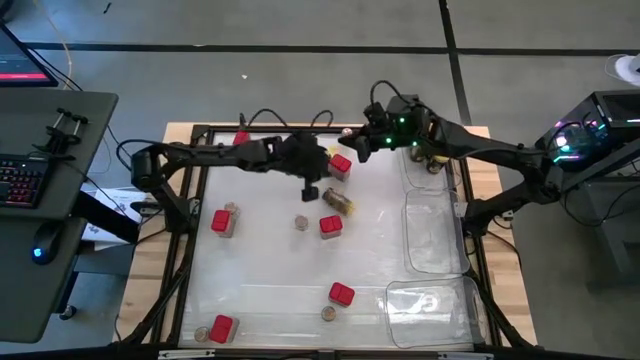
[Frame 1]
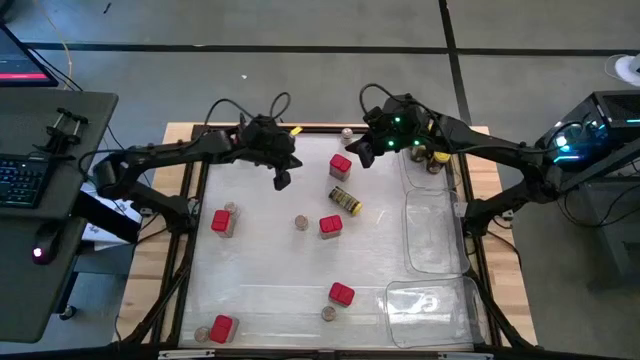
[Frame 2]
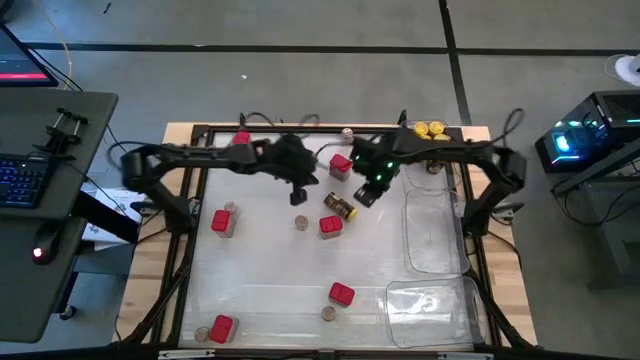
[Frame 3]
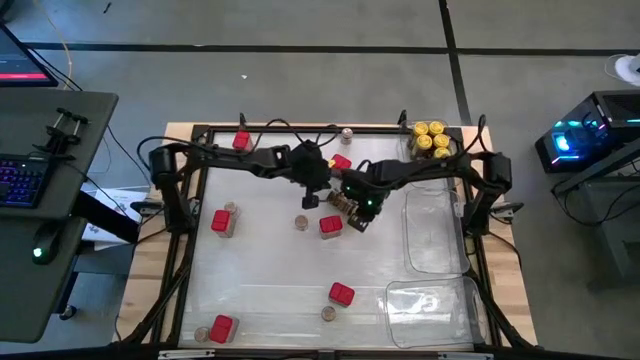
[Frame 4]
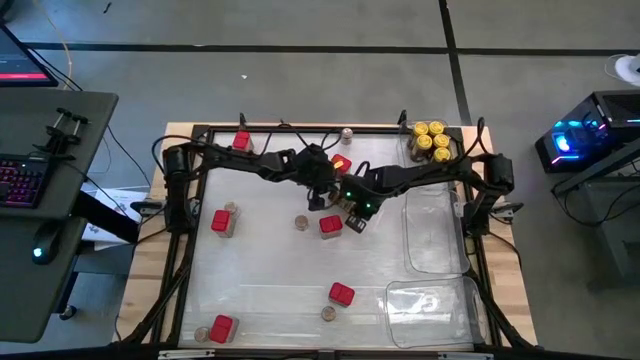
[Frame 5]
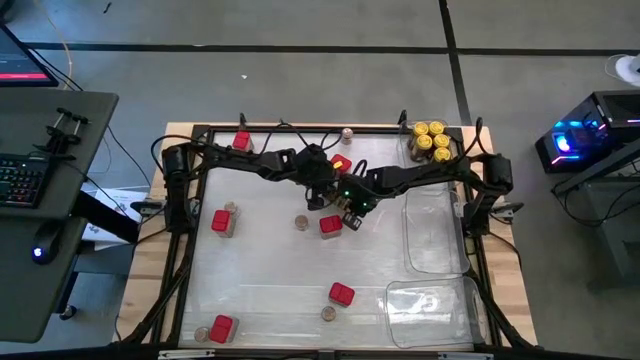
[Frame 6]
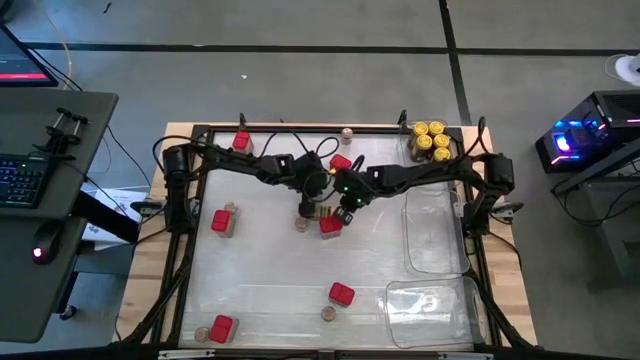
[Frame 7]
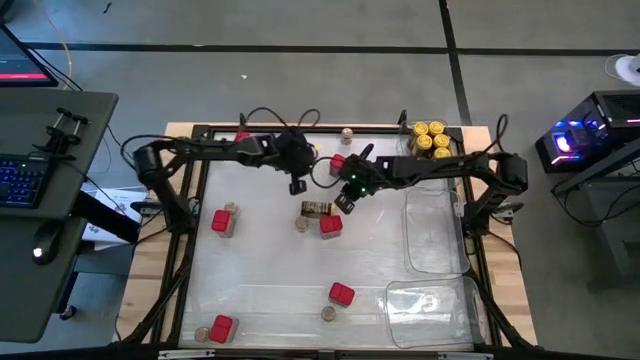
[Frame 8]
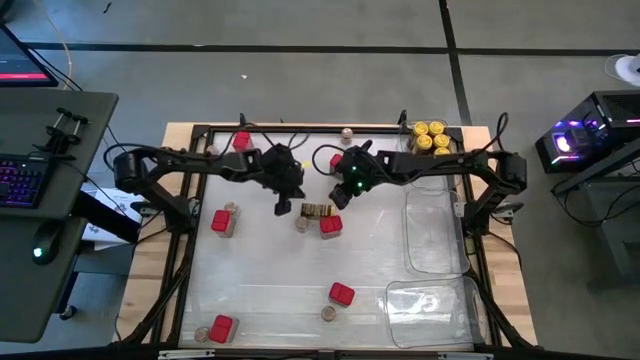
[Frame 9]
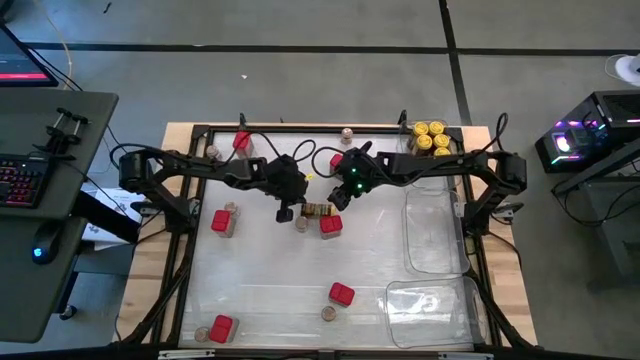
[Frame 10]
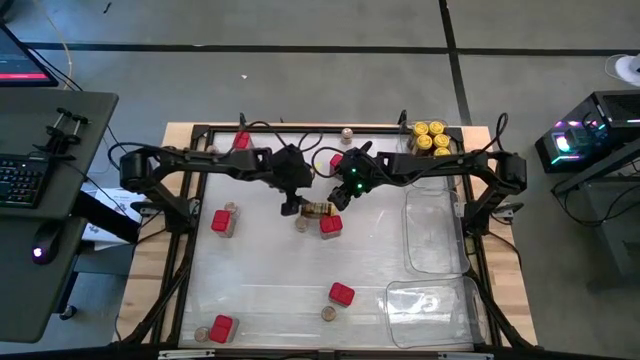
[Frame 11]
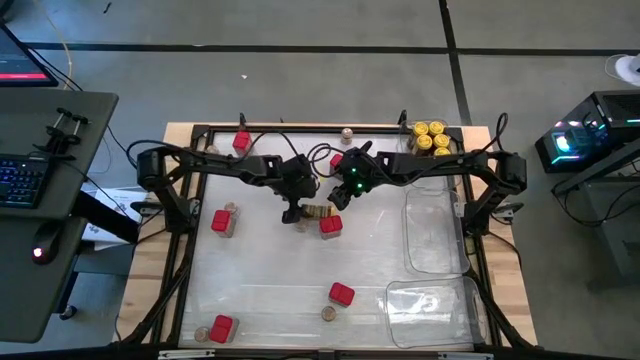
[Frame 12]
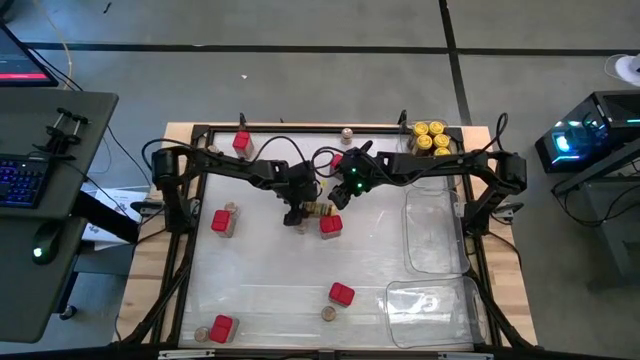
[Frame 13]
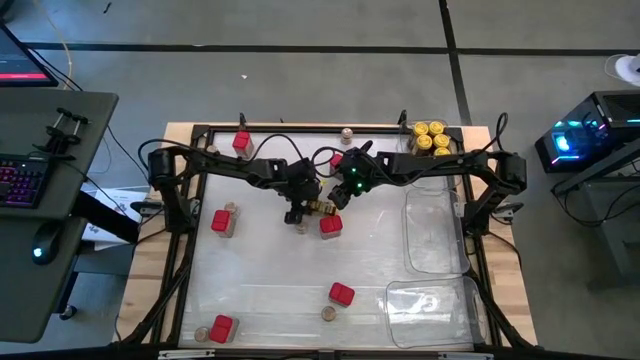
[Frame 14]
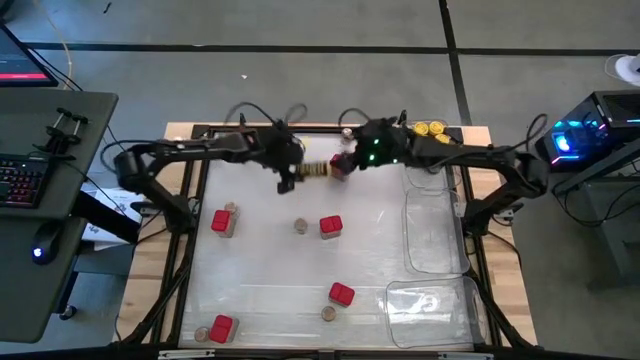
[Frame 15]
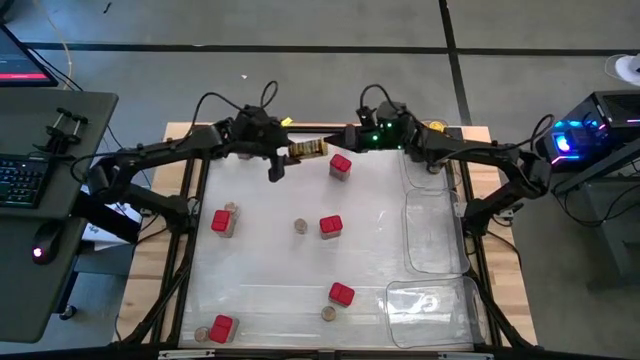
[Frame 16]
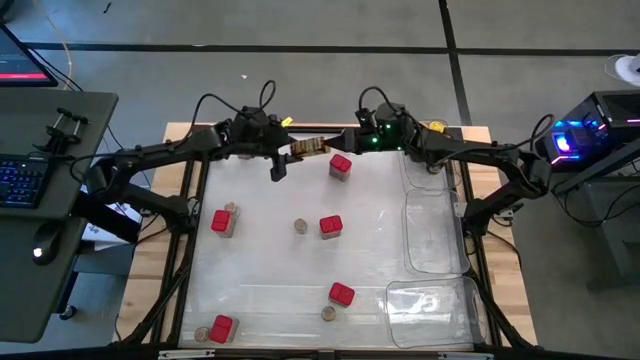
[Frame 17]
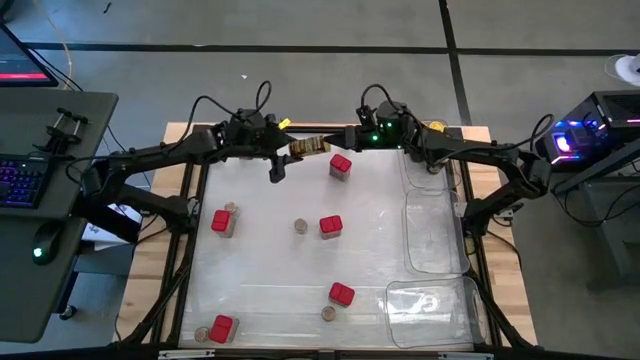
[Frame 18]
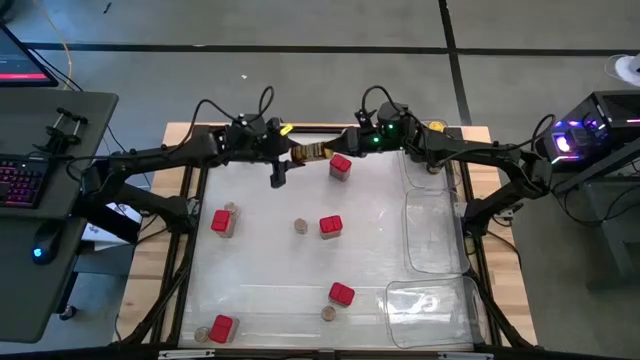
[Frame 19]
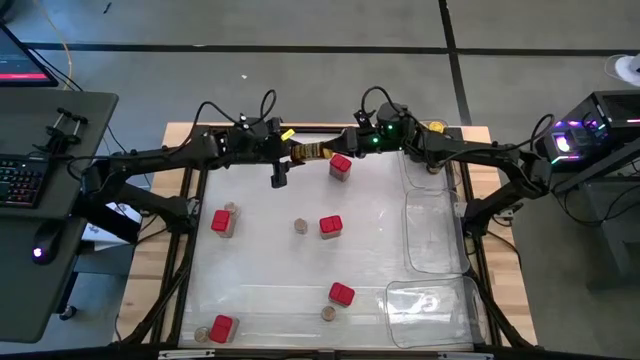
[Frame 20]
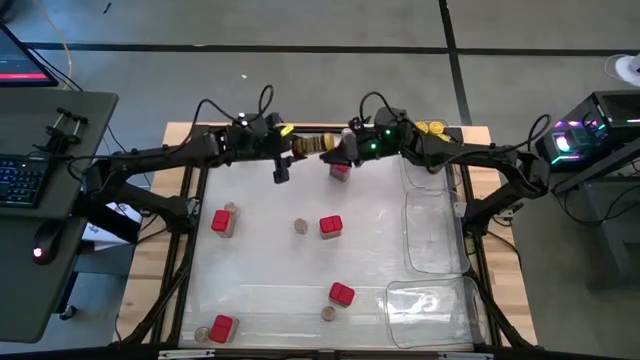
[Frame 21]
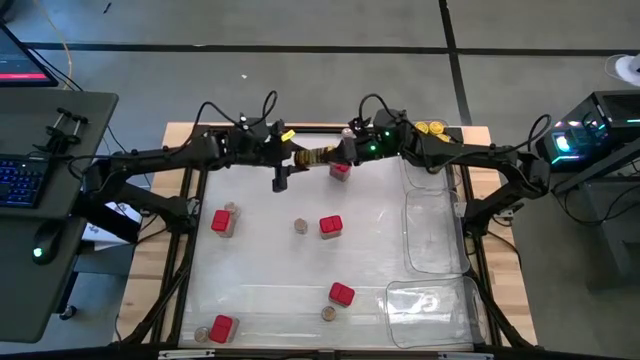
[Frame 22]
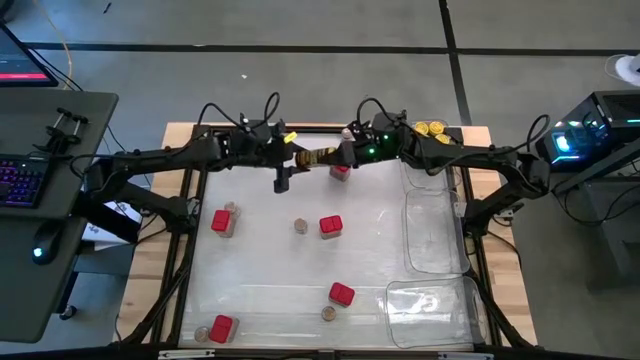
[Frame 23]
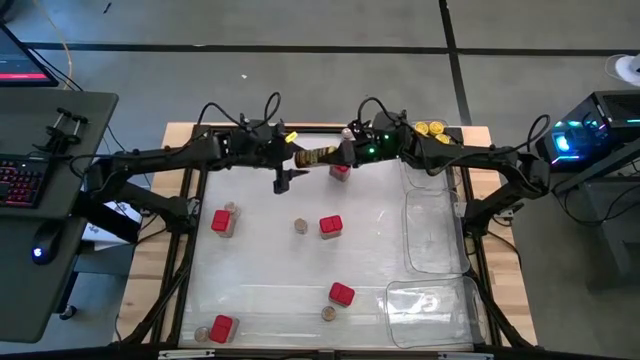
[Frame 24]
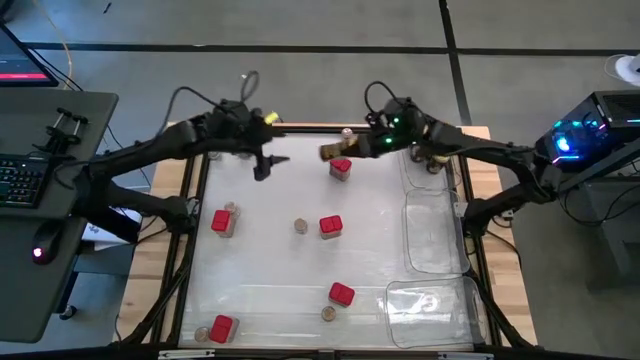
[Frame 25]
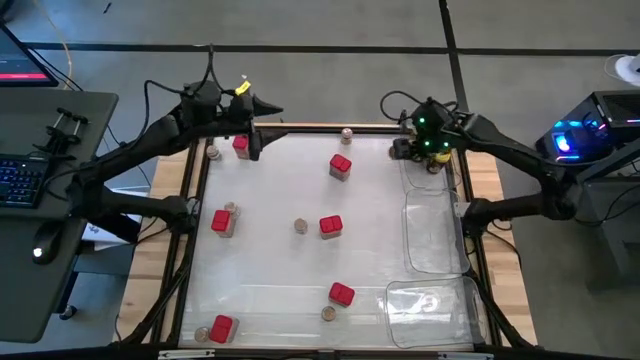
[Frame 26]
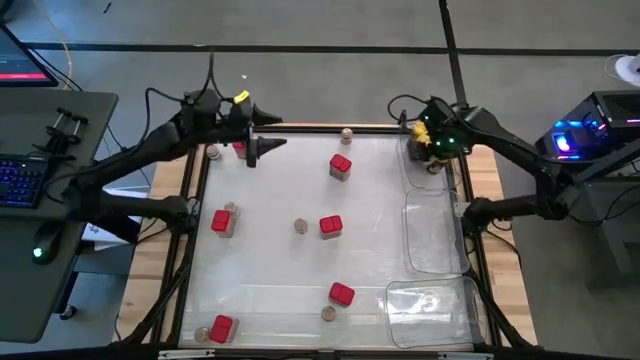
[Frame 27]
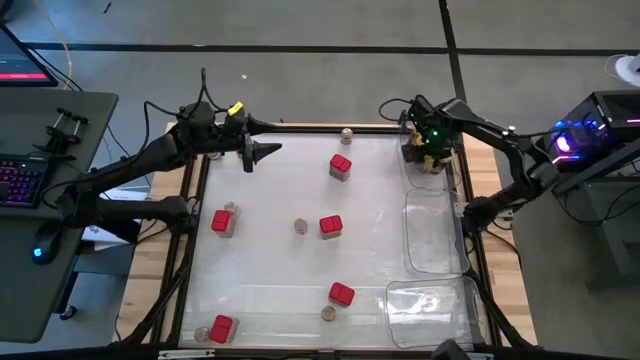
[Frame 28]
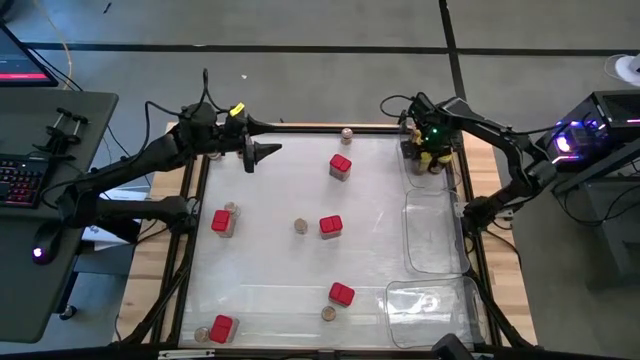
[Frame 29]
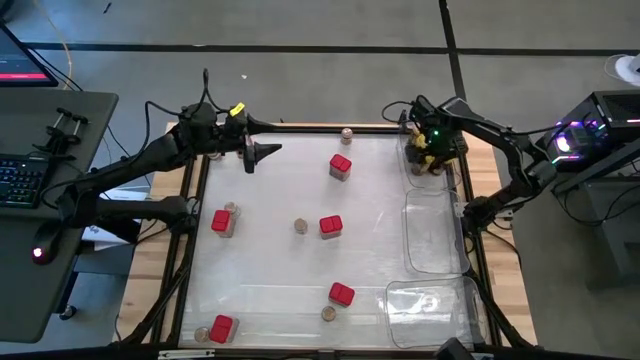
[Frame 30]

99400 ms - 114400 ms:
Task: Sort spices by type
Put the yellow seasoning bottle into the top transparent bin

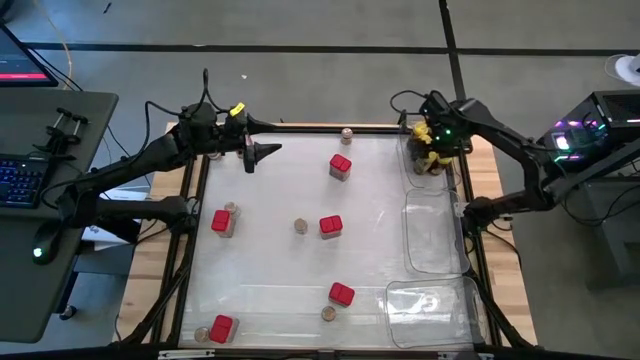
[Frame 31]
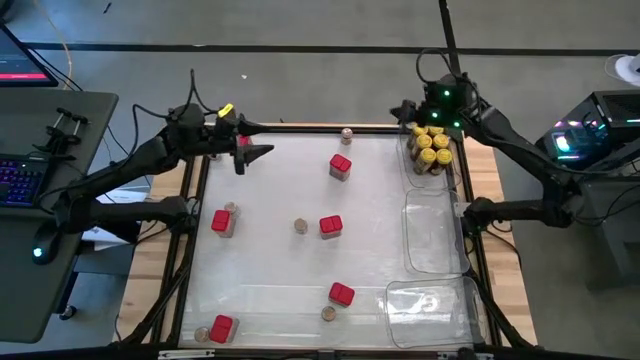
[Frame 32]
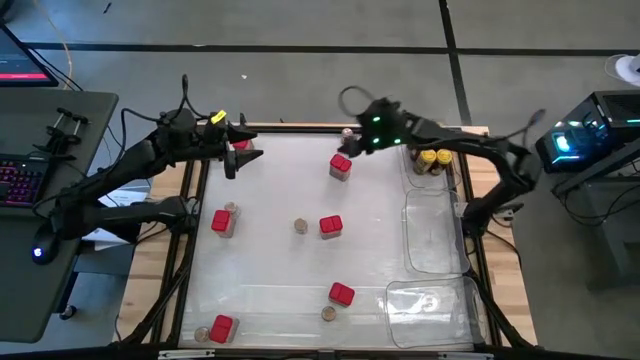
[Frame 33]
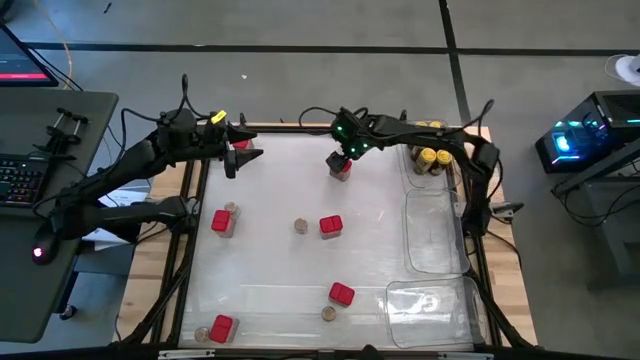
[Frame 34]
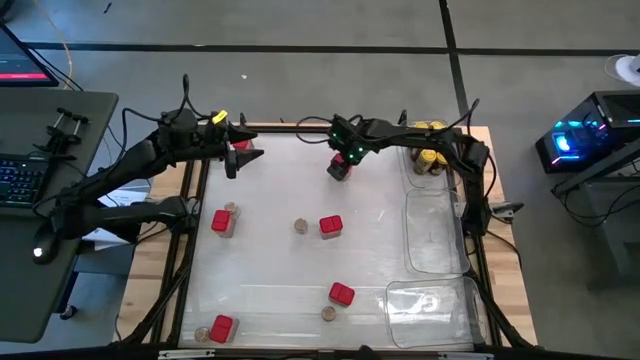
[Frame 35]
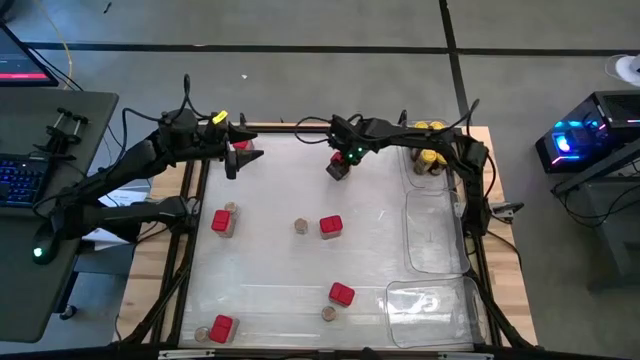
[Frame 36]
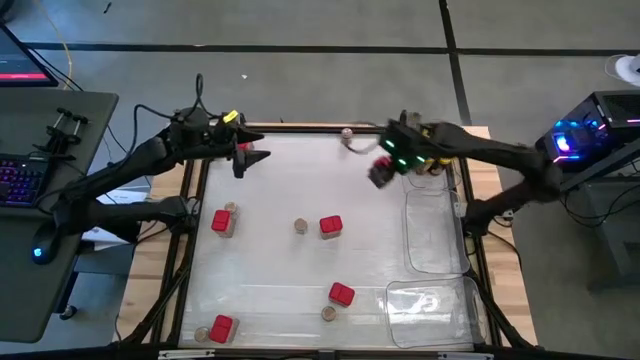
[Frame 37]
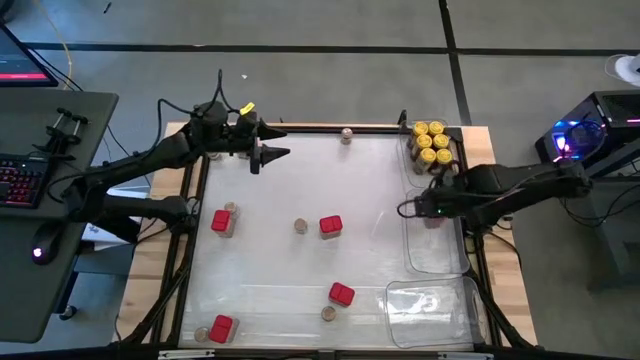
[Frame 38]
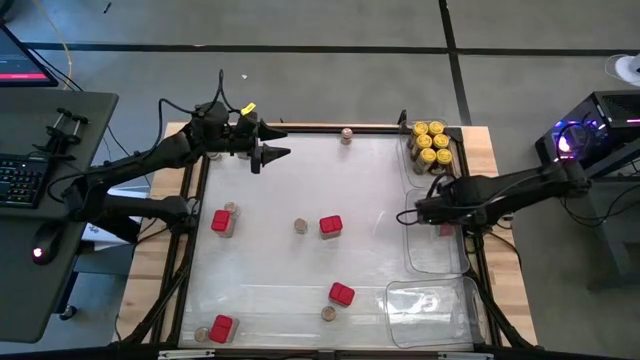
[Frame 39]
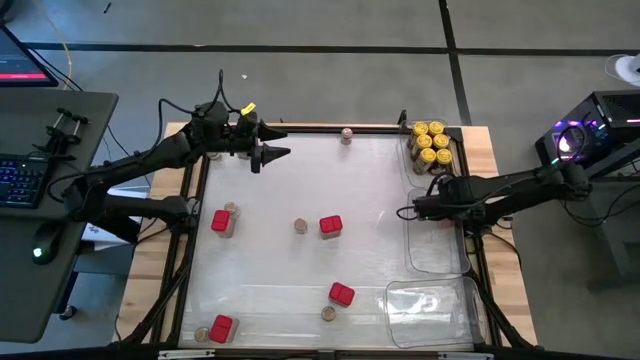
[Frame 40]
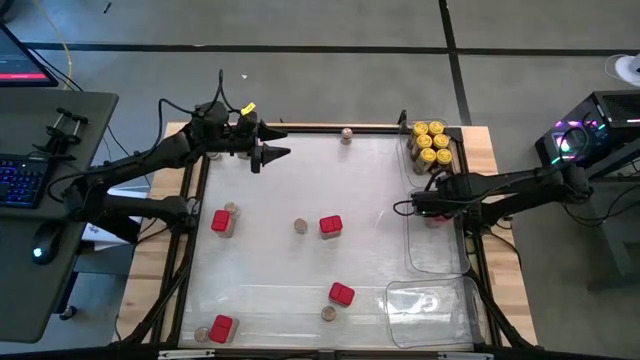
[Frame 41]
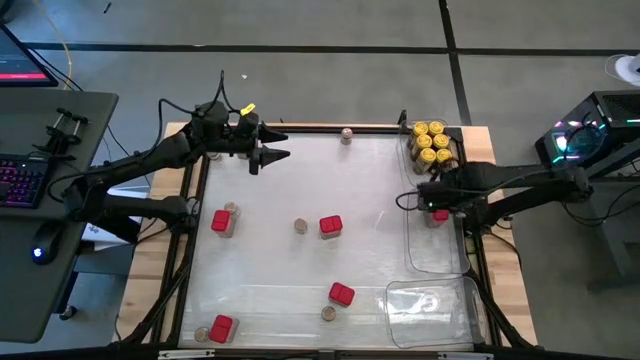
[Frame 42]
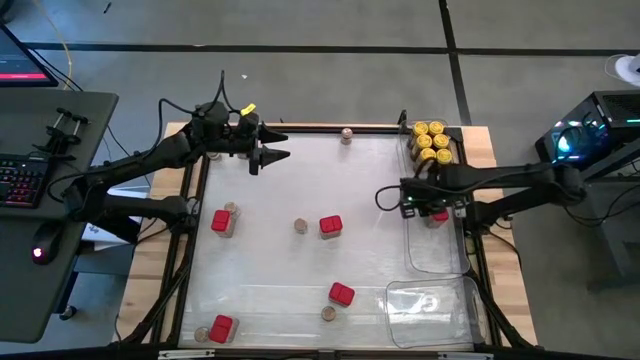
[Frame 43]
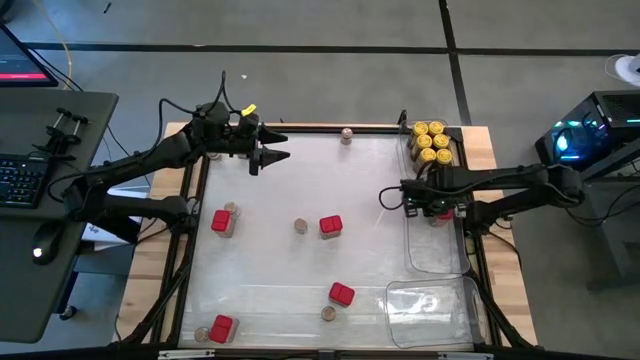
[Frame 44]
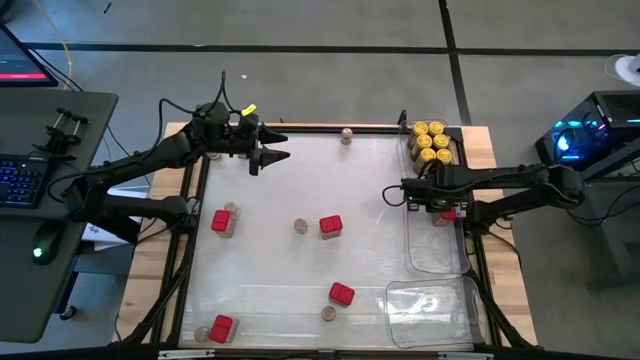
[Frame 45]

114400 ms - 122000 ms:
Put the red seasoning into the middle transparent bin
